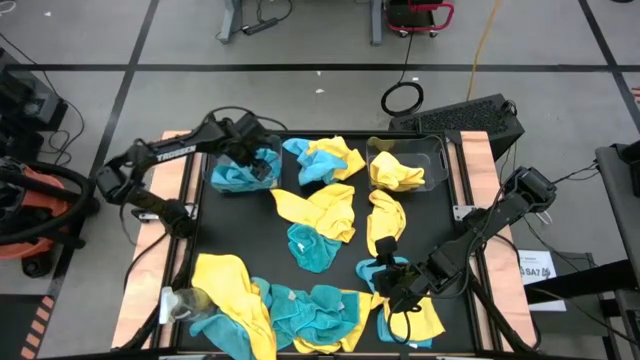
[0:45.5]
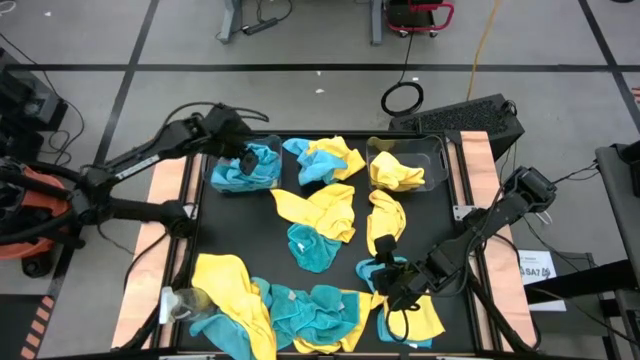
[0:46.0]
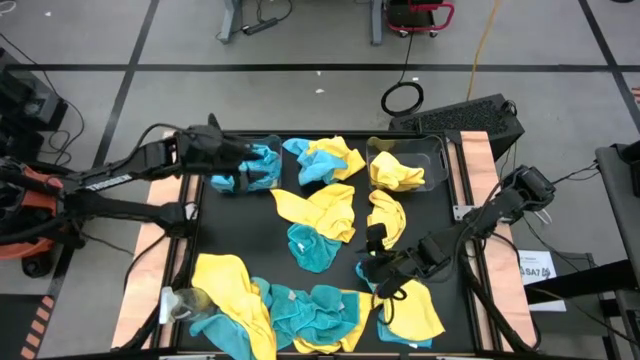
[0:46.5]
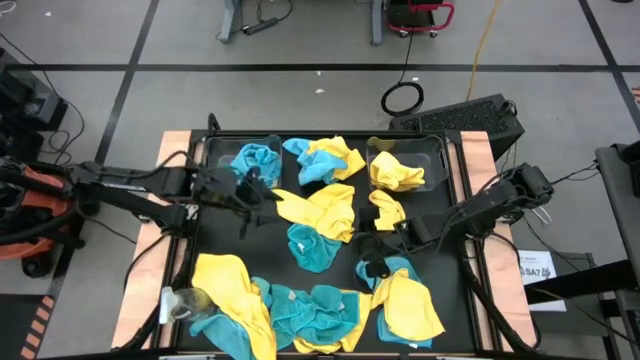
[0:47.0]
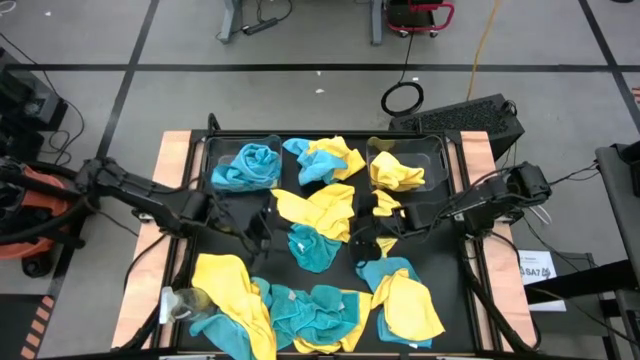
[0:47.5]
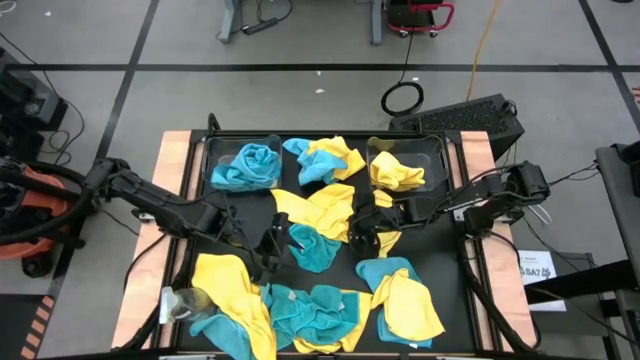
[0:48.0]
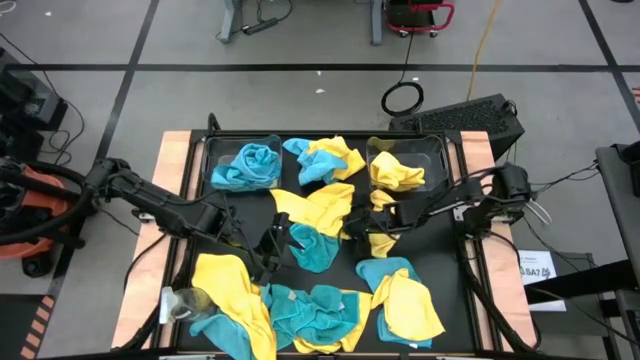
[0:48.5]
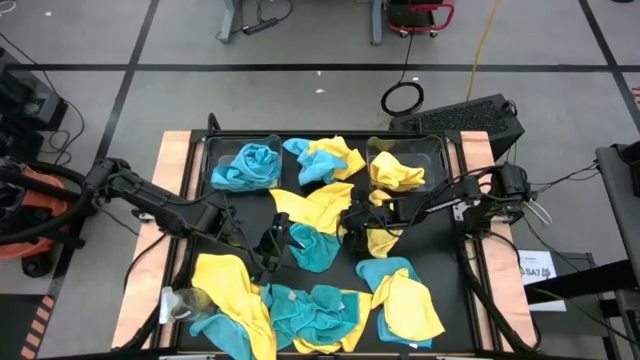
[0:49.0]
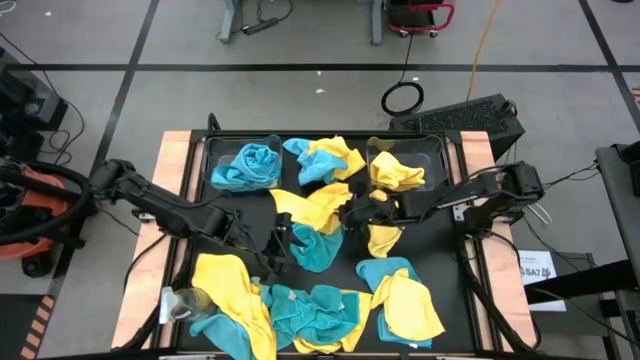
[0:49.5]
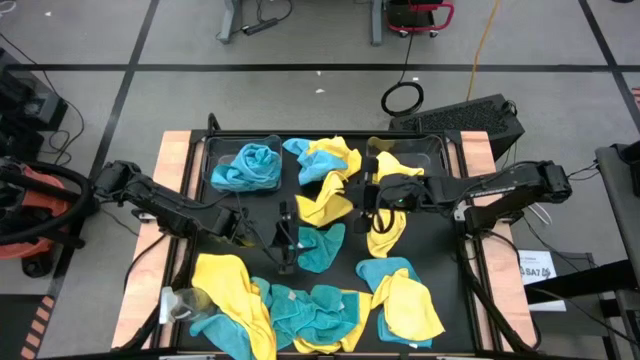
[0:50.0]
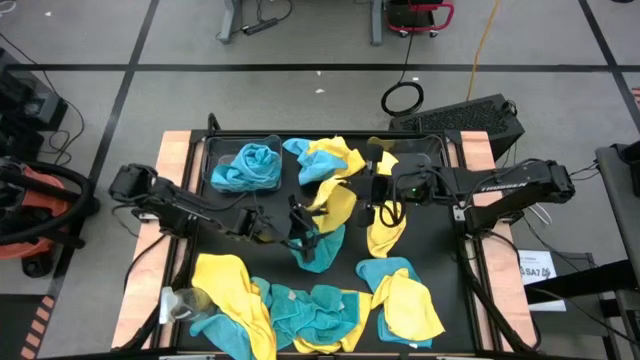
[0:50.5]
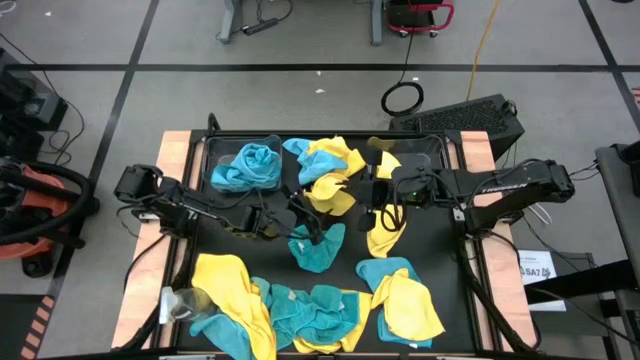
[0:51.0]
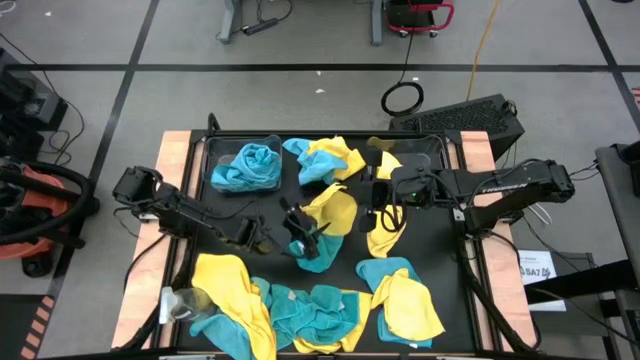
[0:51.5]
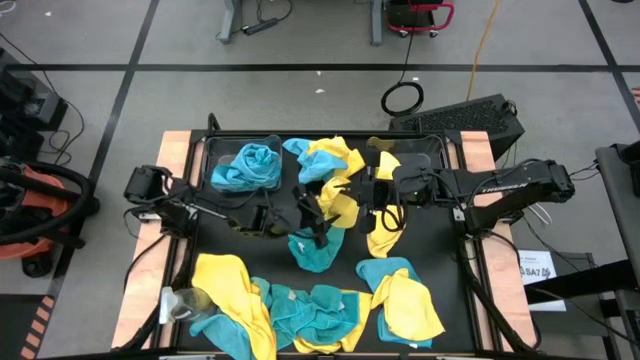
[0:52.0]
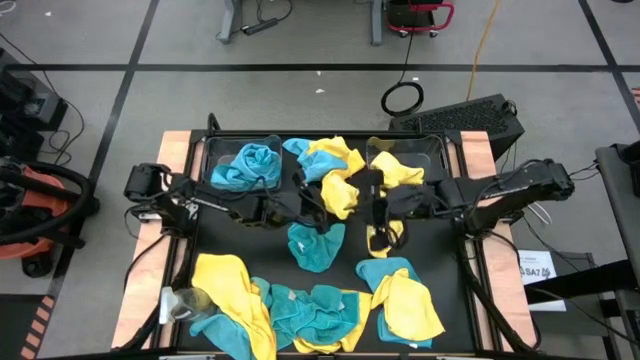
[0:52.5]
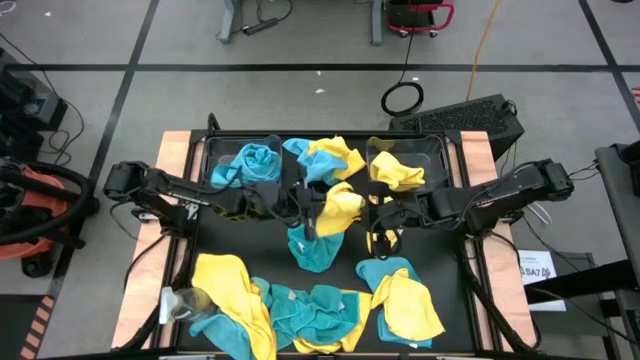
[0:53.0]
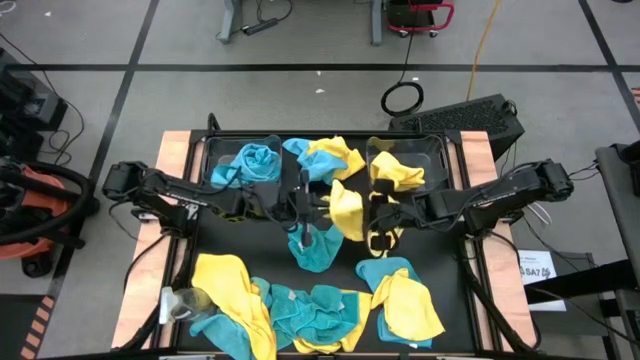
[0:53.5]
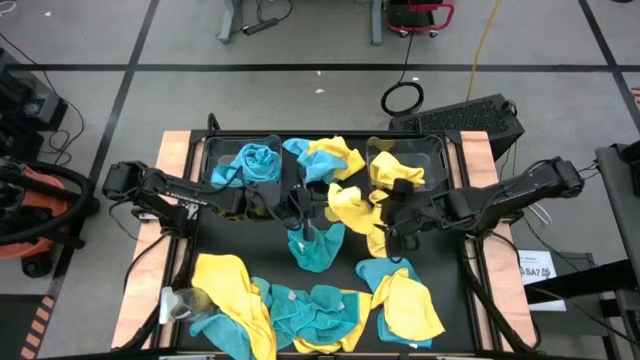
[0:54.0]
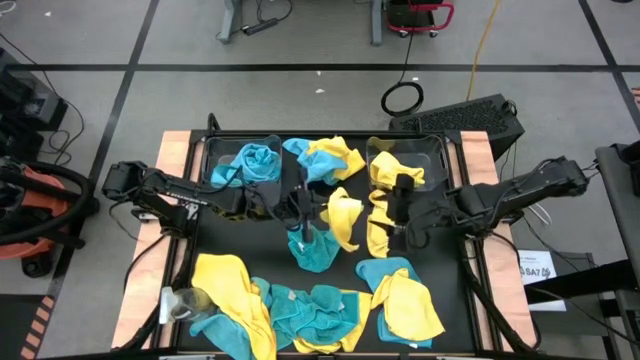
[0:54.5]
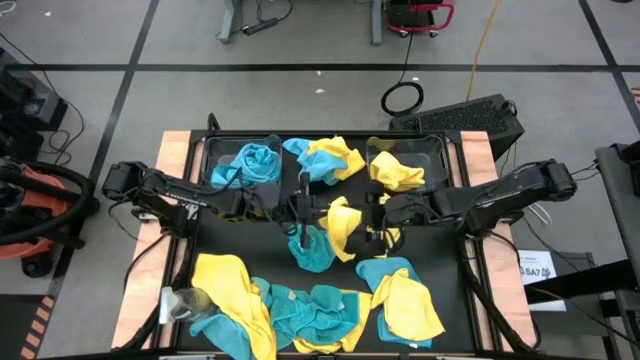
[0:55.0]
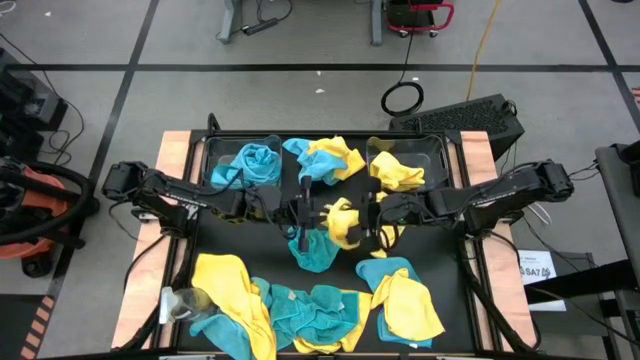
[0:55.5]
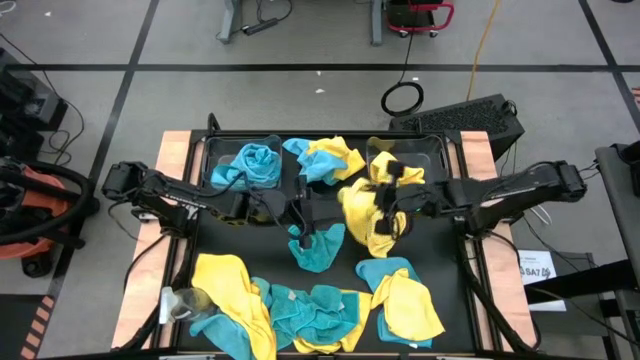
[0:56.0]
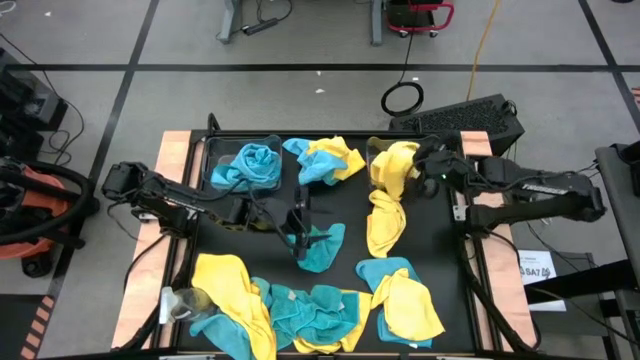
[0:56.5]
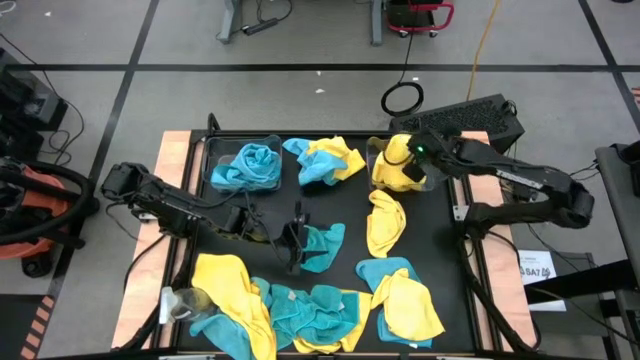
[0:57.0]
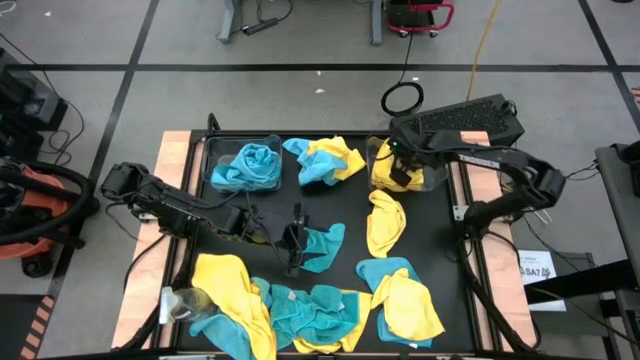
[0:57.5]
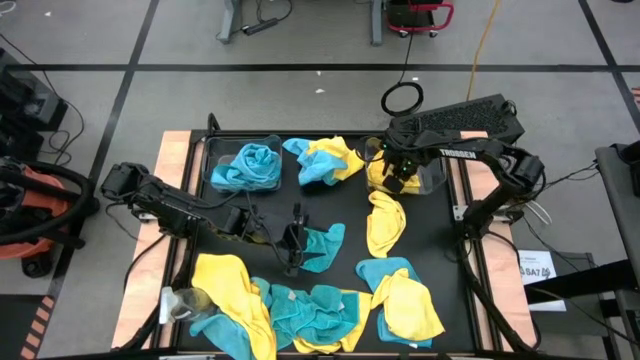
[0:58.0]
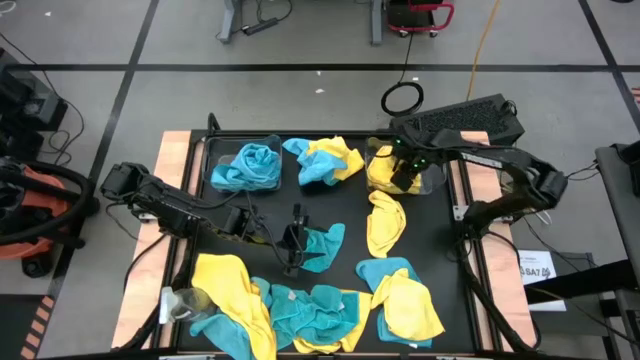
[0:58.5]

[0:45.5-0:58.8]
Task: Sort microfiber towel by color & place in baskets
Put the yellow microfiber cloth into the right transparent bin

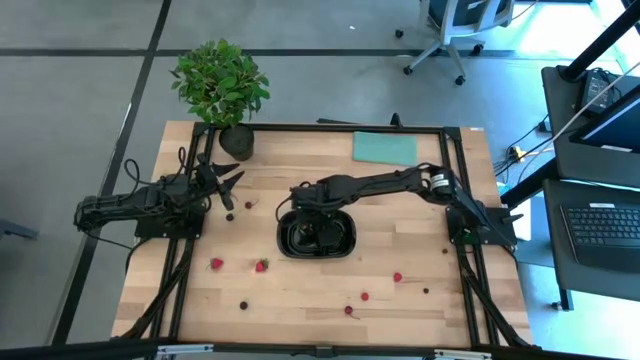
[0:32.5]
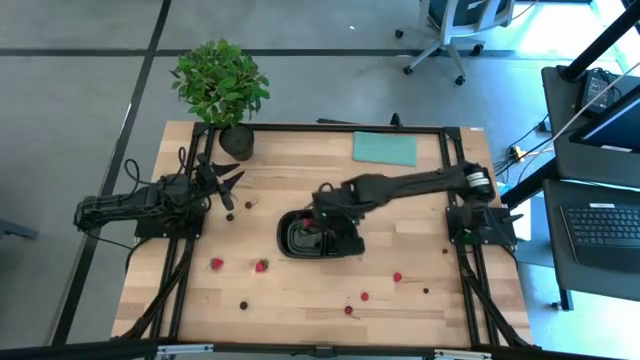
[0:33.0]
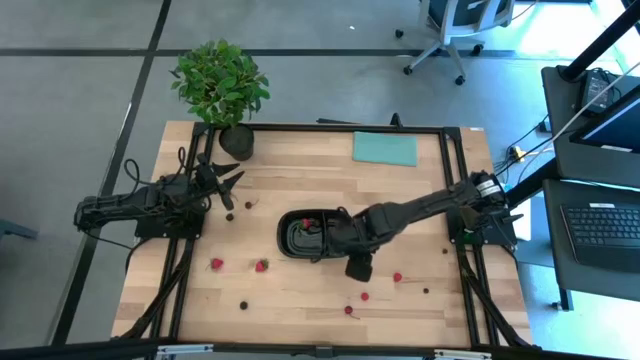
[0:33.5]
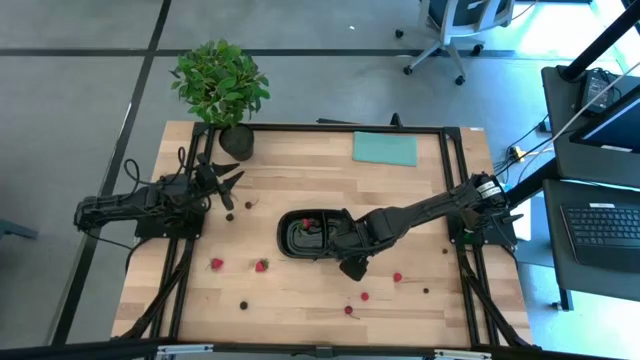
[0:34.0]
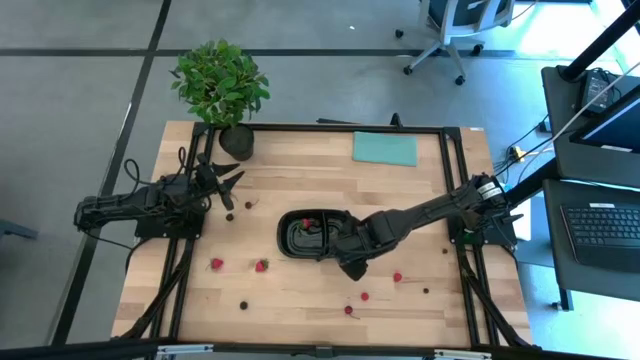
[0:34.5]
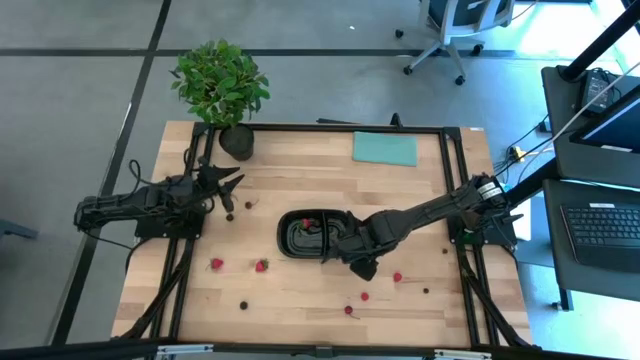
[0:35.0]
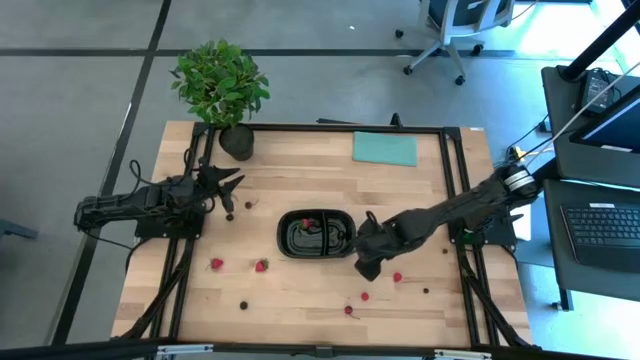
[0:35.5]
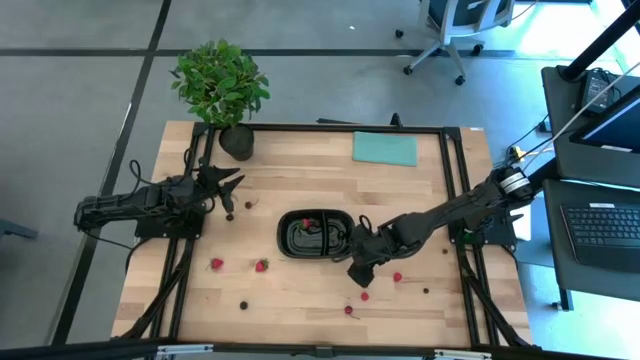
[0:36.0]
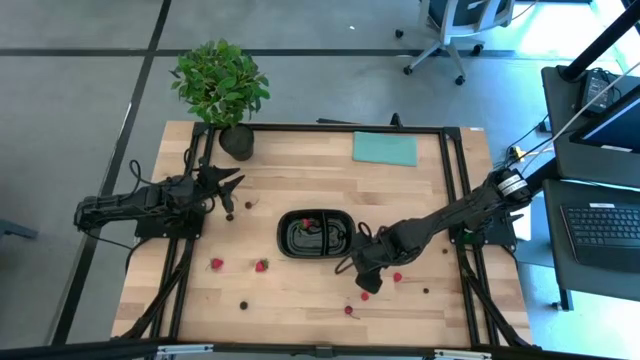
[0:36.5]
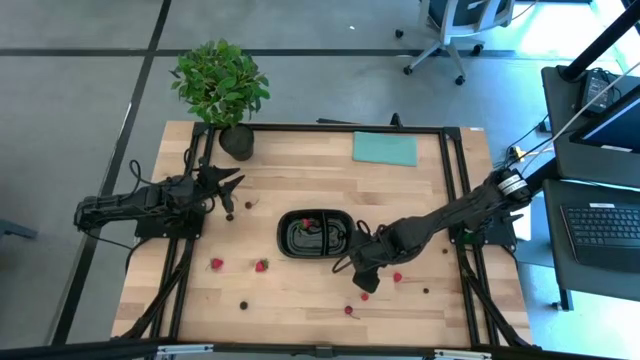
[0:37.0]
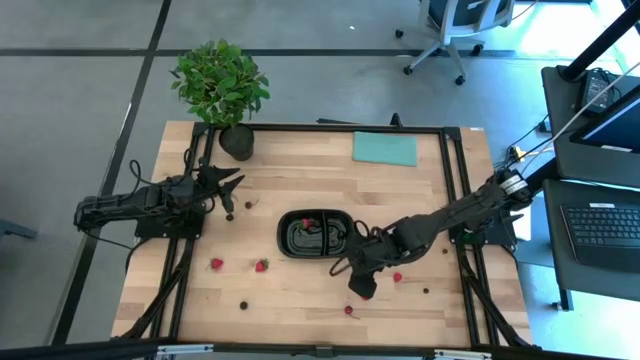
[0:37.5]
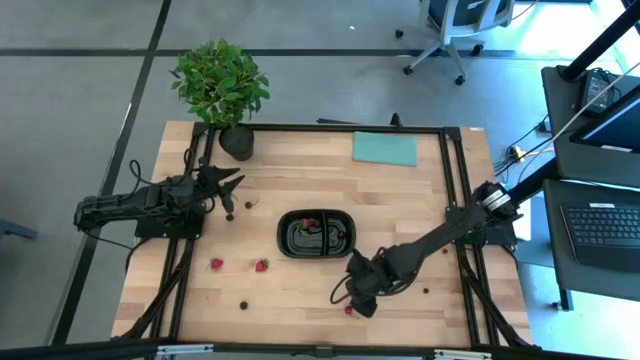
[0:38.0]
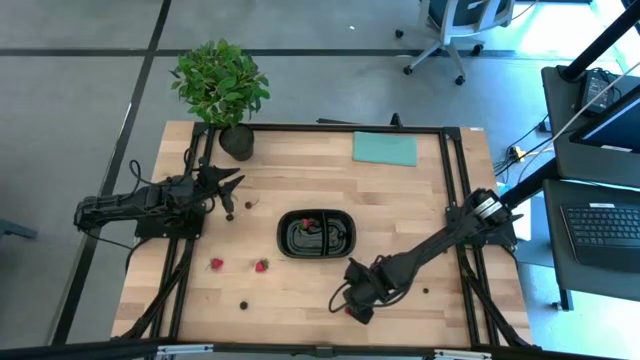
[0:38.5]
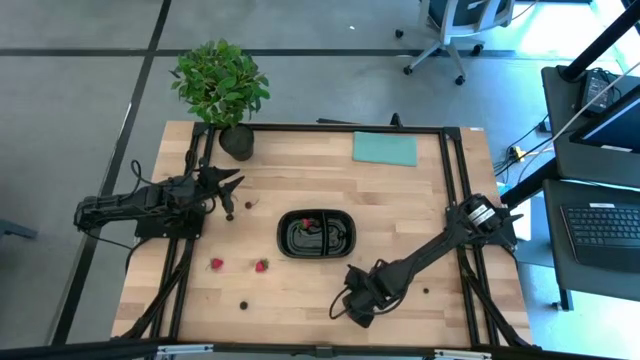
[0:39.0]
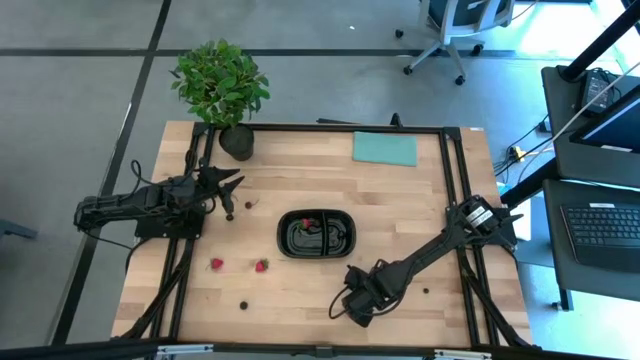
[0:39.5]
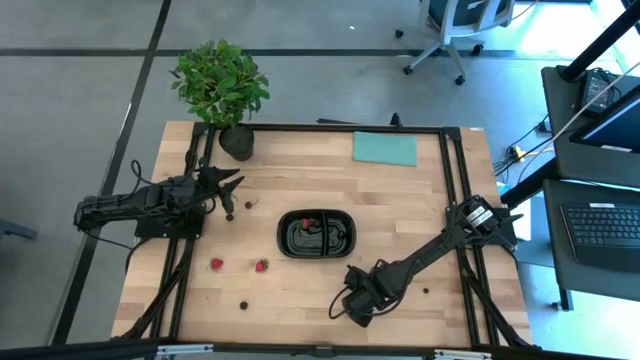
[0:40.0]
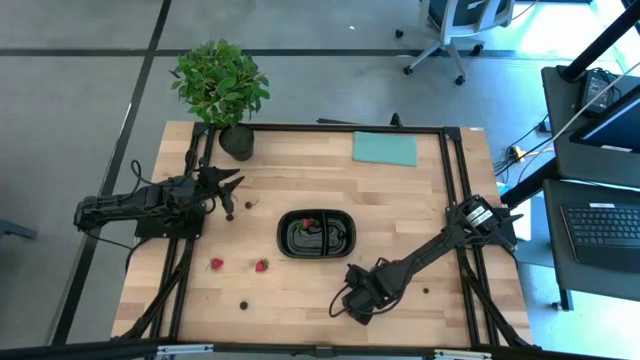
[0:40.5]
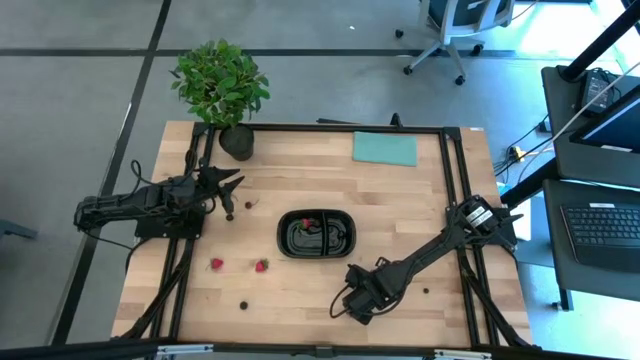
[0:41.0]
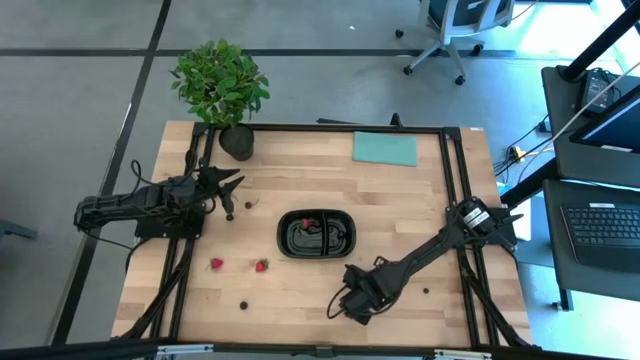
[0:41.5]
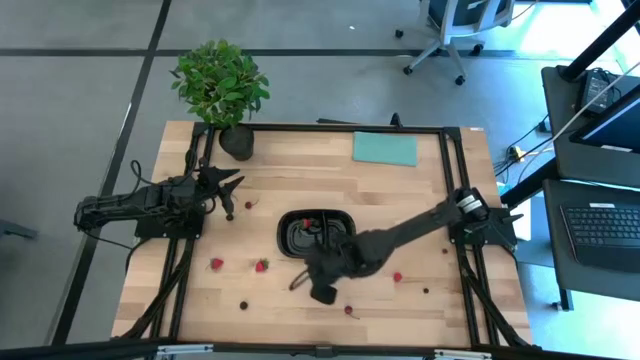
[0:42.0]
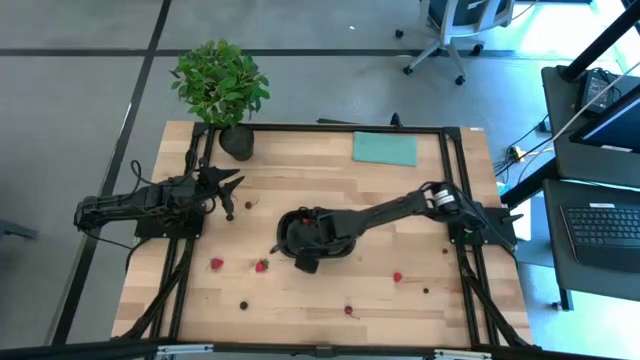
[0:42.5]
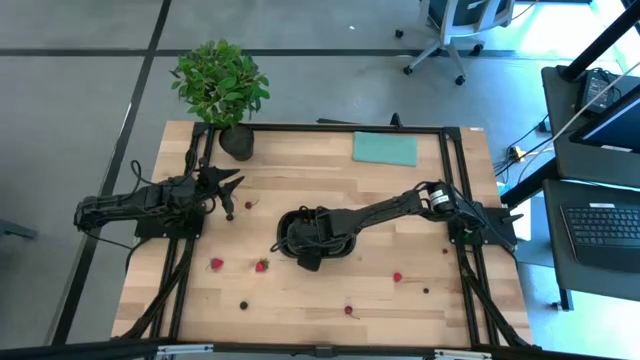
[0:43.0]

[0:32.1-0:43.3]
Task: Pick and placing Produce into tupperware
Put the bottom red raspberry into the left section of the black bin
